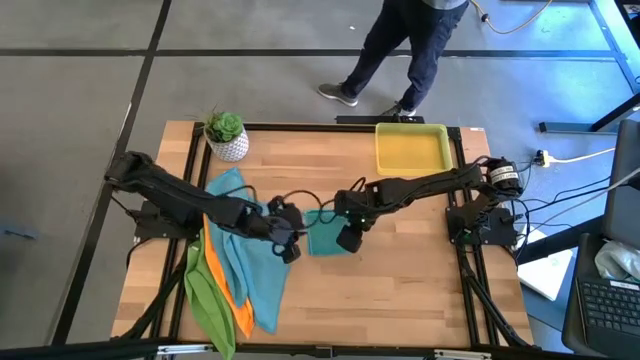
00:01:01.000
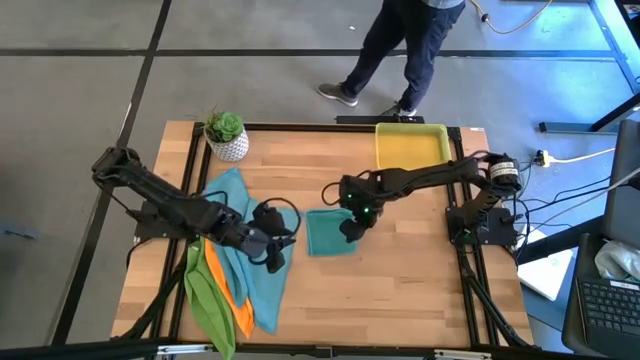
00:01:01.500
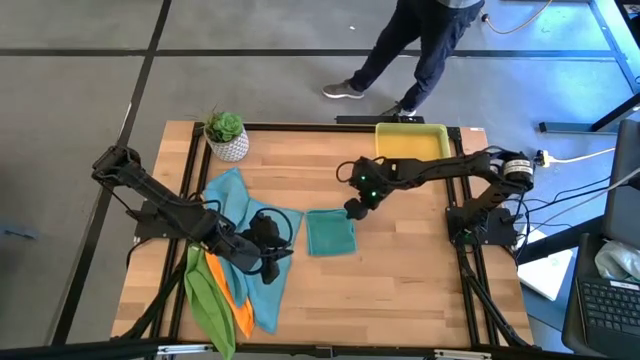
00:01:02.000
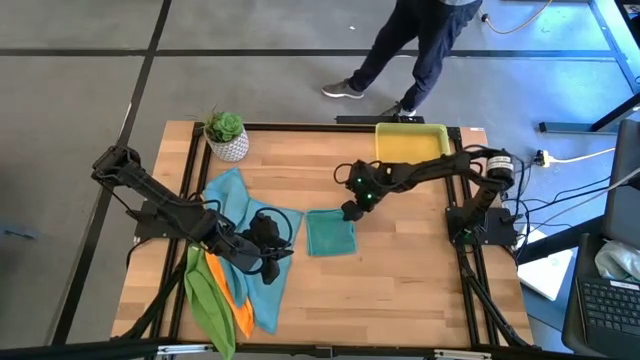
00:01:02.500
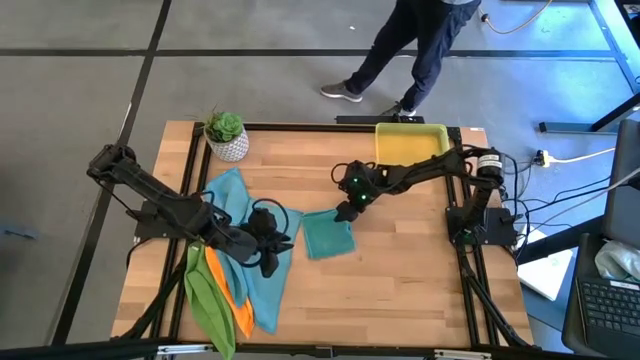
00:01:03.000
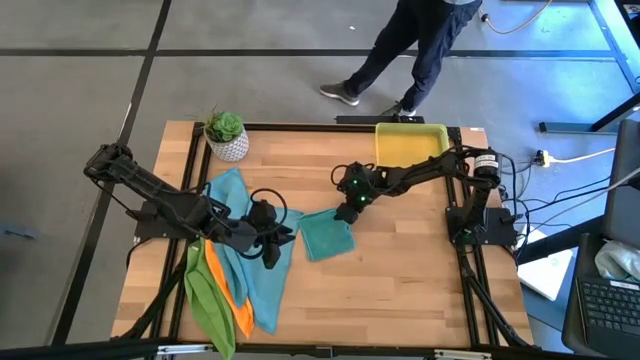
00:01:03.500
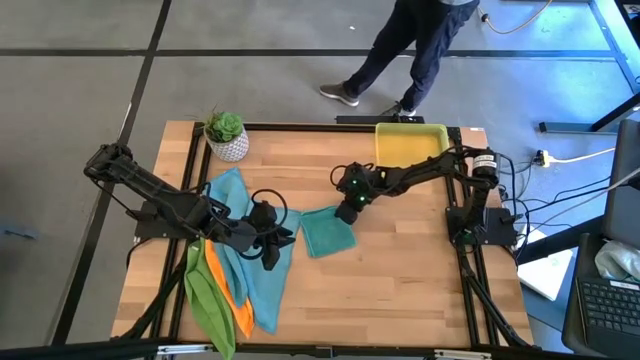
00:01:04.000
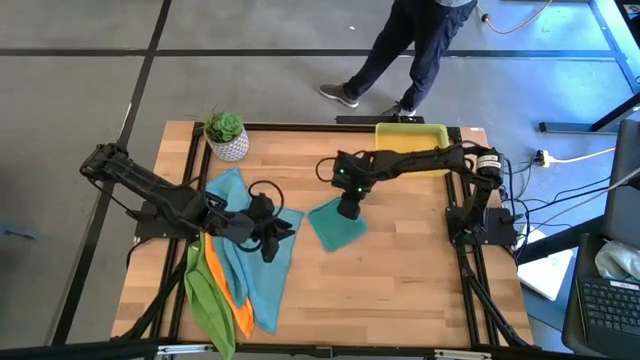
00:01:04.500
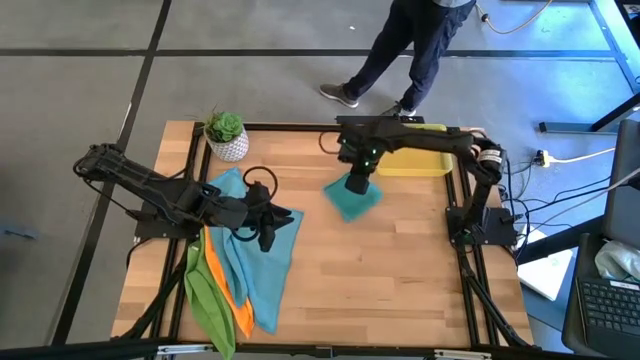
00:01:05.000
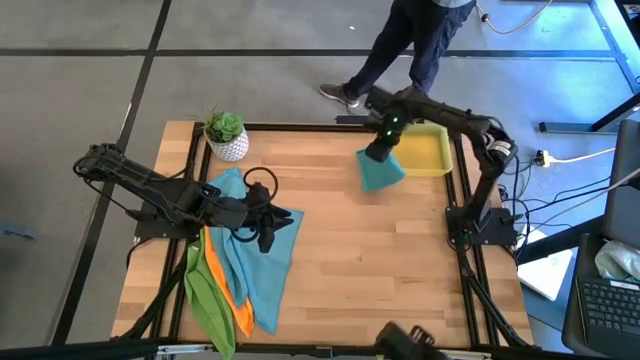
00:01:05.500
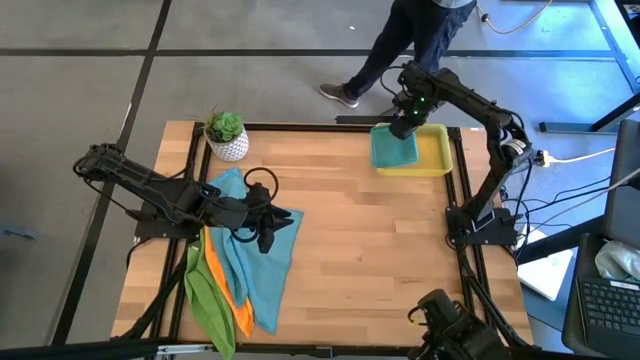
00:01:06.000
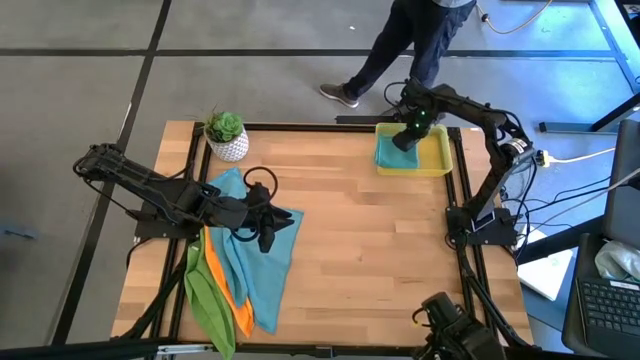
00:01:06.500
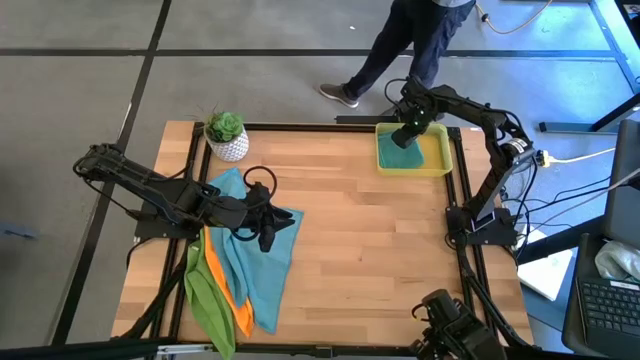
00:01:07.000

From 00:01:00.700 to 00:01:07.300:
Task: Fold microfiber towels
Put the folded blue microfiber towel into the bin

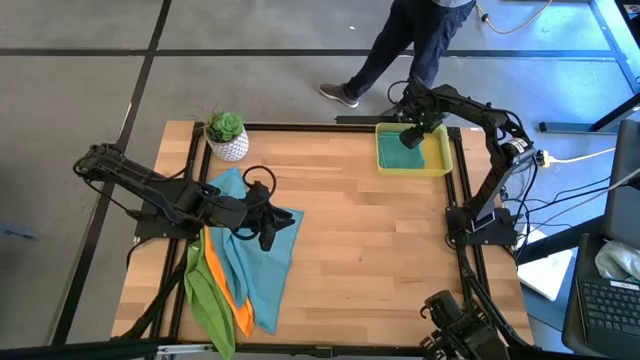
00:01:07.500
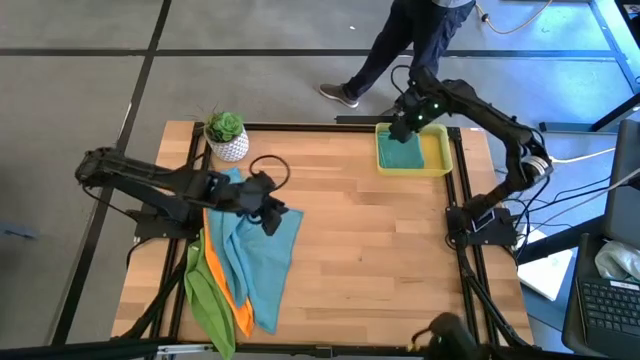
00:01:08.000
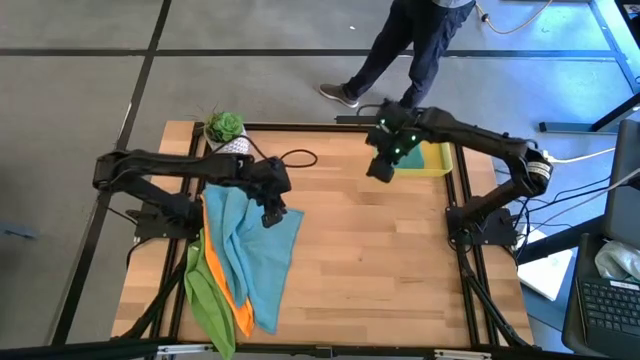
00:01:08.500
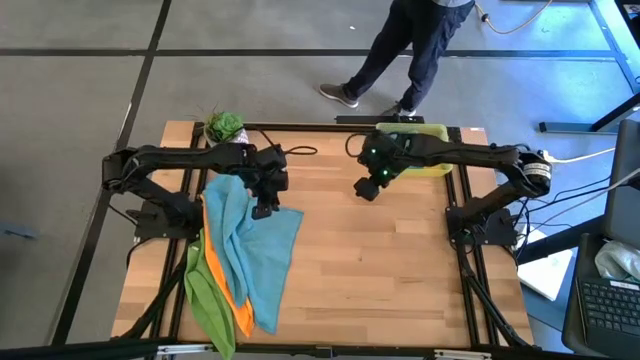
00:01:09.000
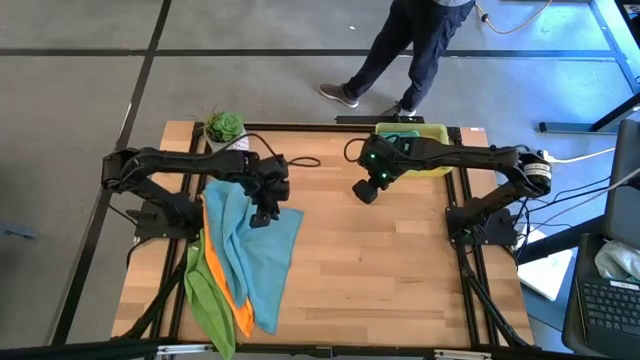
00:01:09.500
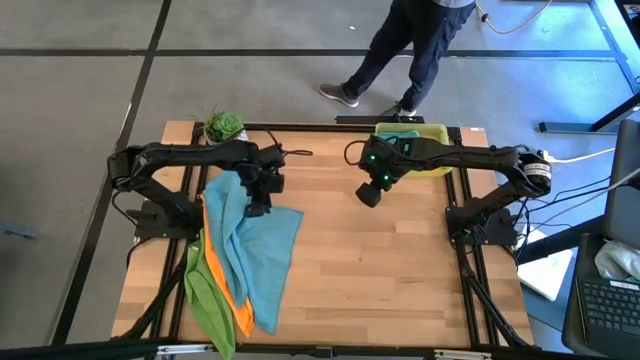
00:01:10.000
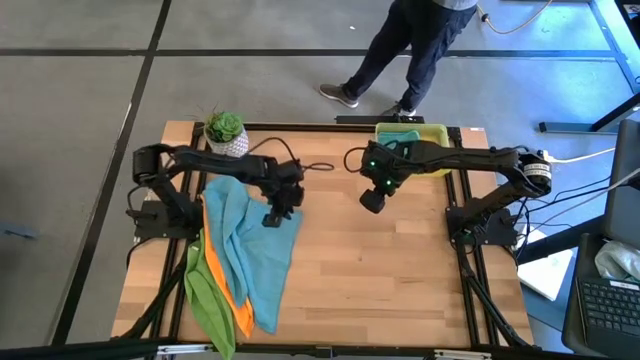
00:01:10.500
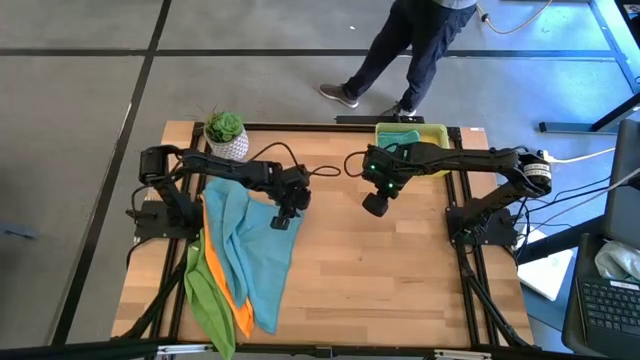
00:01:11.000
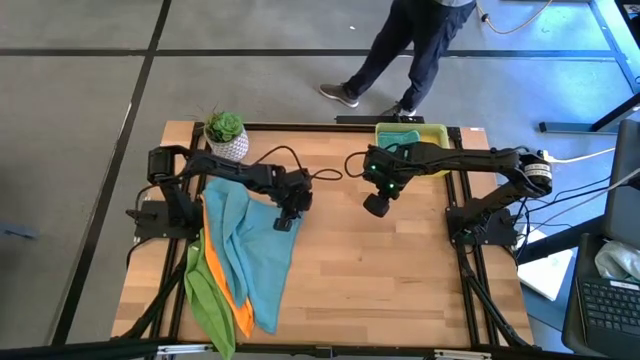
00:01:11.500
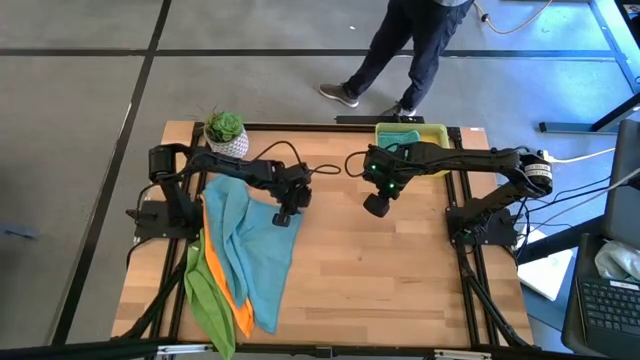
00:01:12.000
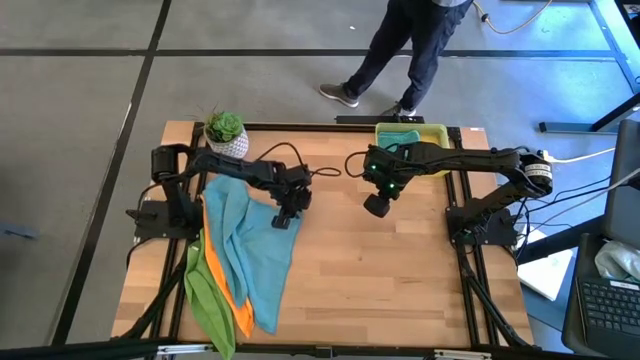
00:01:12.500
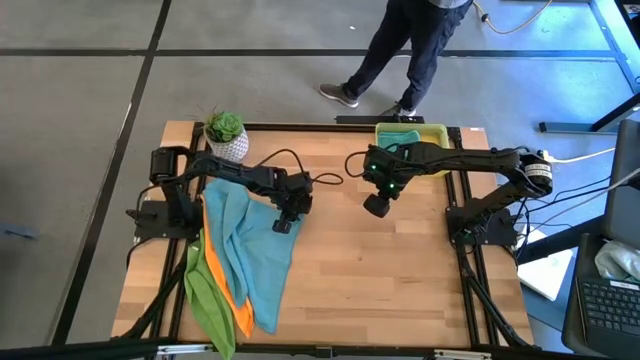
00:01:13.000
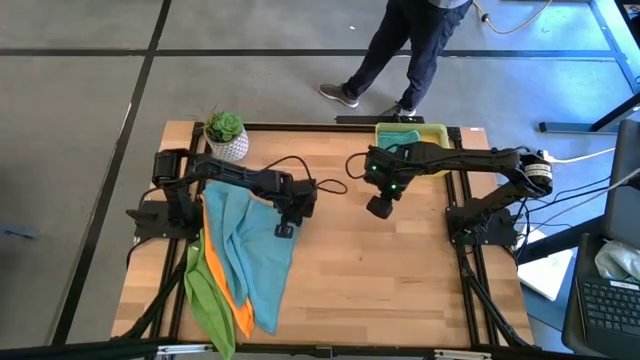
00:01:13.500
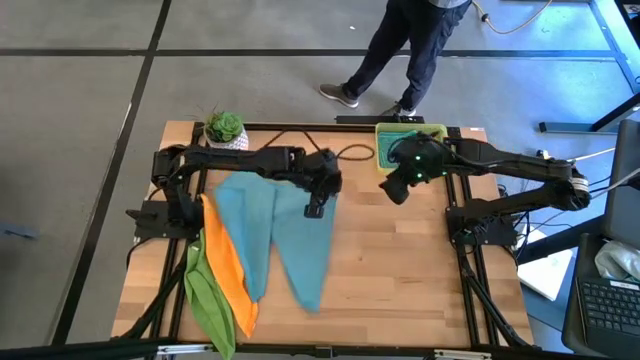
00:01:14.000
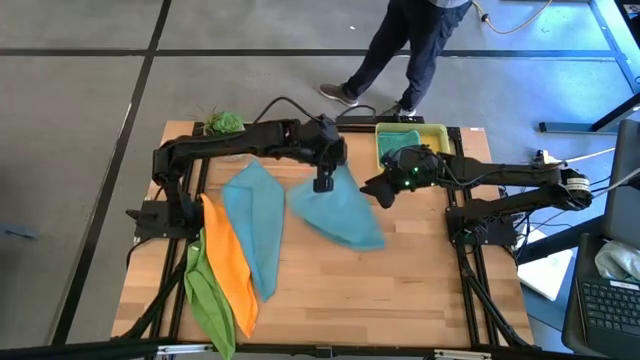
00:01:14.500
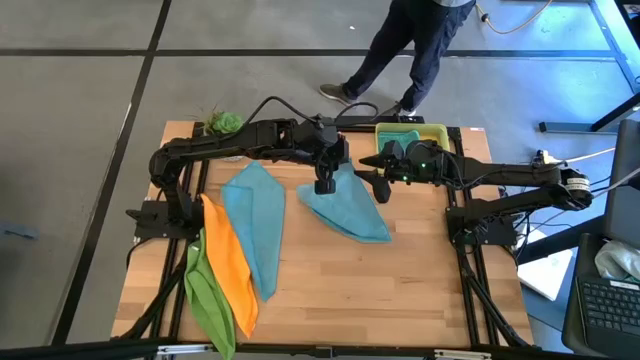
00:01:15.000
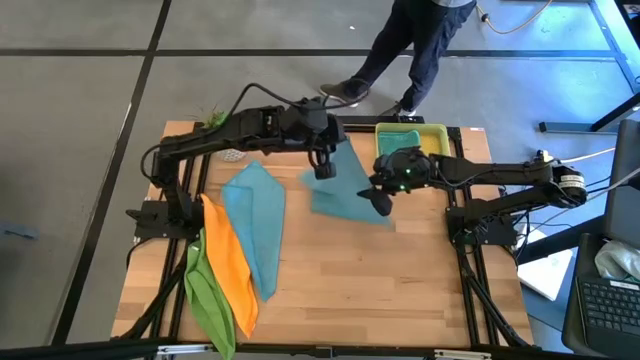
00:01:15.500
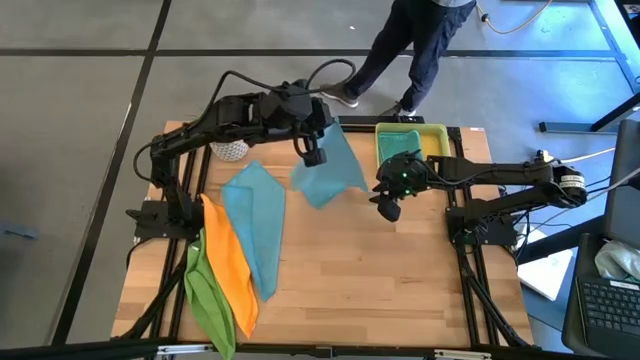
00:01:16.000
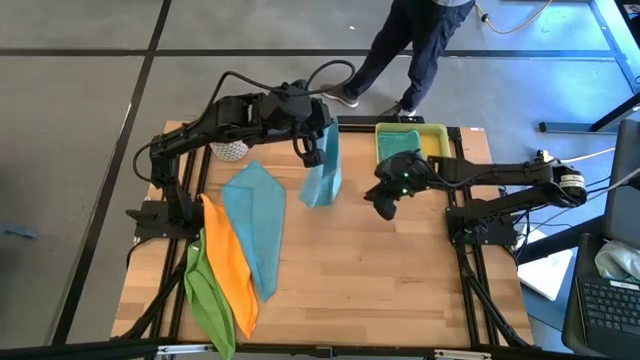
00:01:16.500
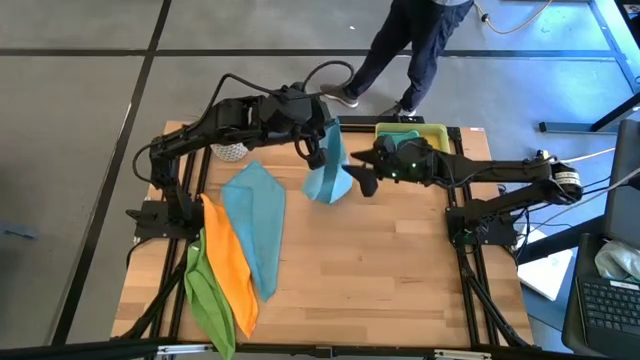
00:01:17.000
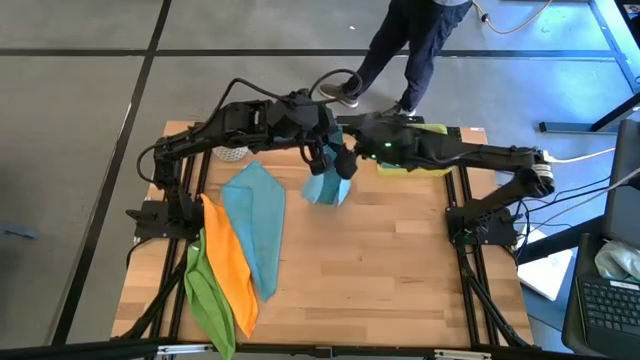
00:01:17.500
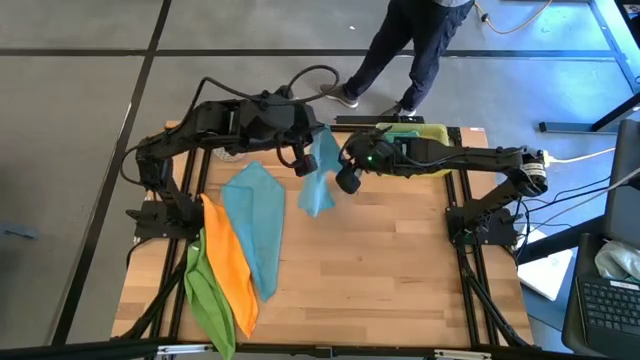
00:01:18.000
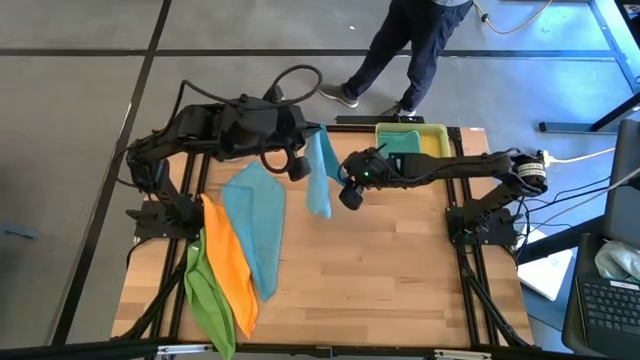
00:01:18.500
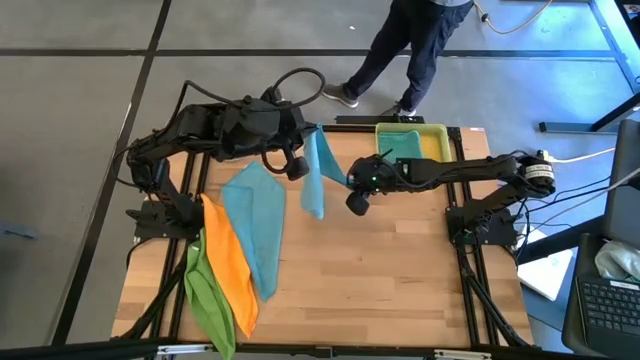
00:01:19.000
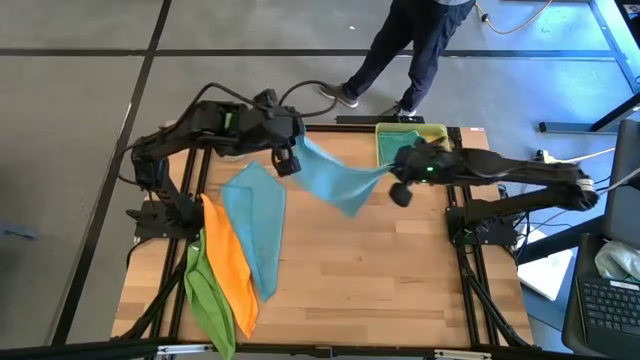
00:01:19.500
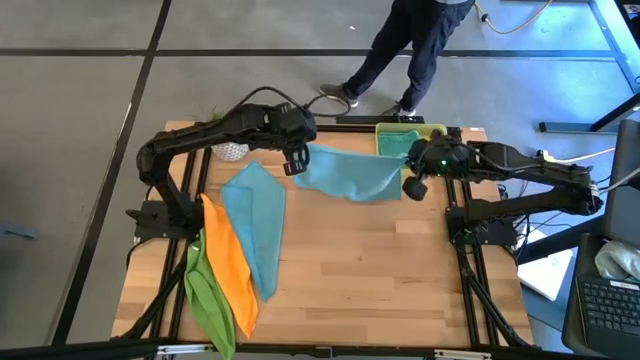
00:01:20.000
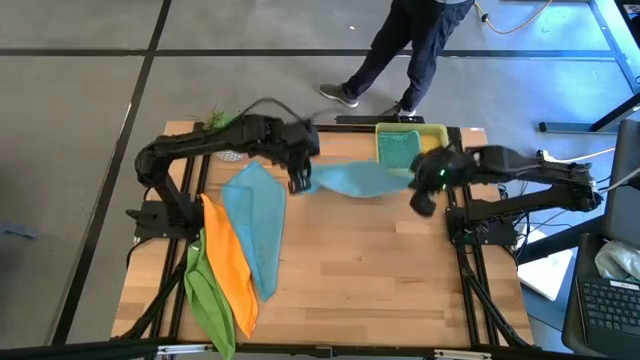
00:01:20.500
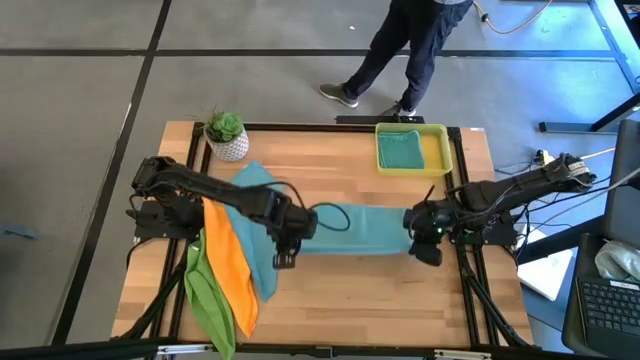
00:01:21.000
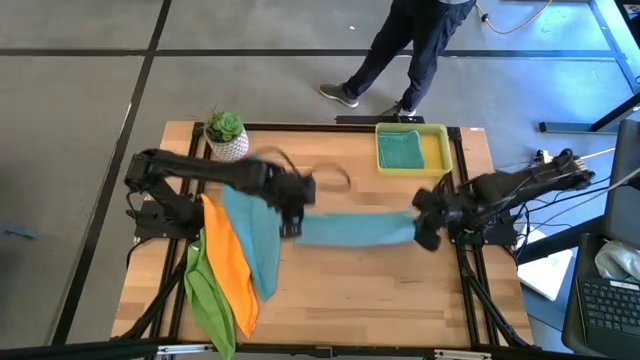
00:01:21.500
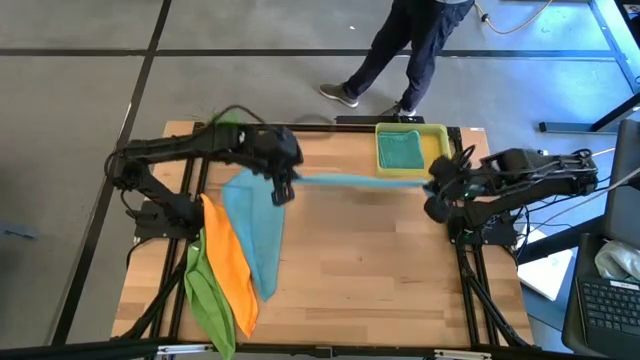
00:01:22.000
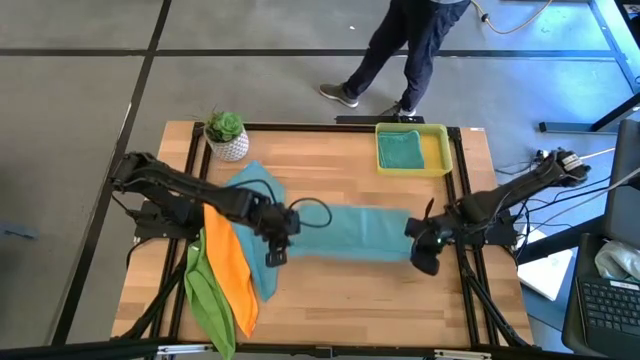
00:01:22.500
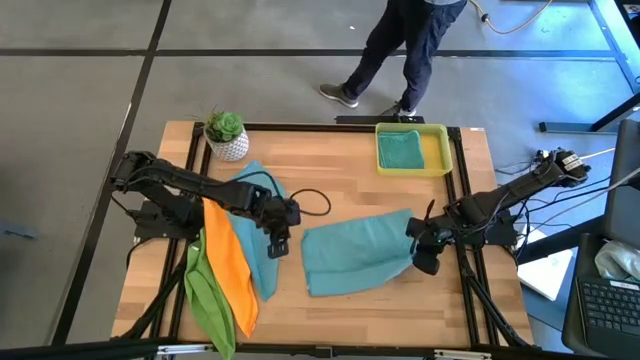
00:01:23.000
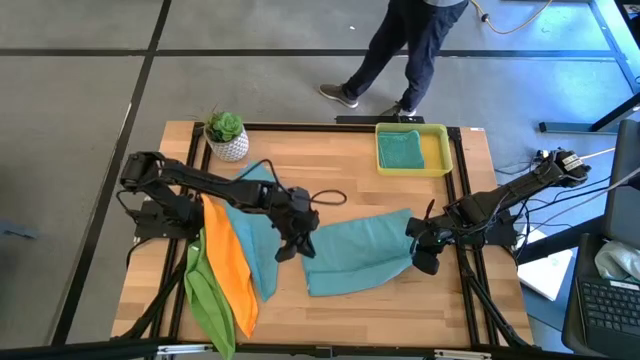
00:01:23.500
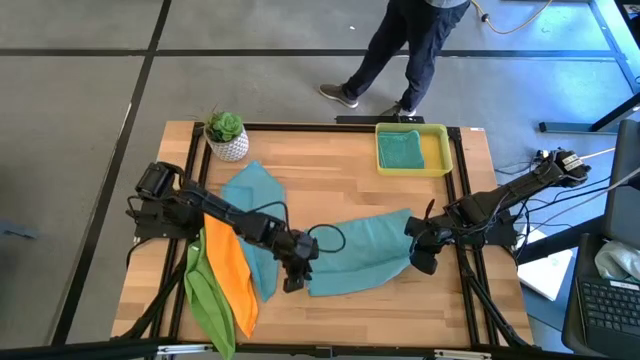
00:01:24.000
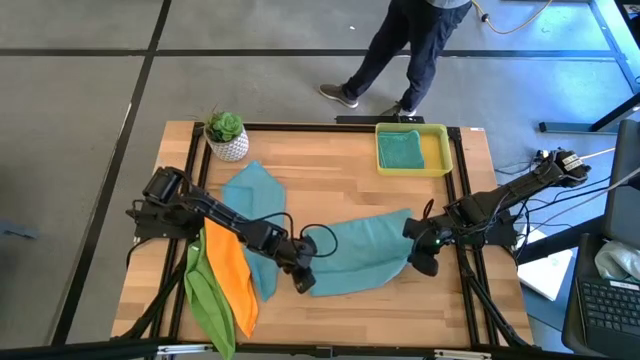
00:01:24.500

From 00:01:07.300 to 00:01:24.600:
Fold the right blue microfiber towel
